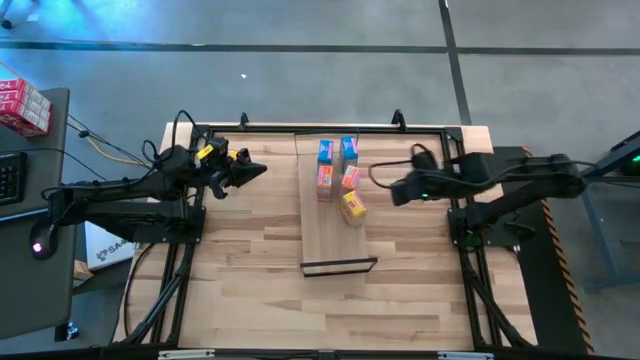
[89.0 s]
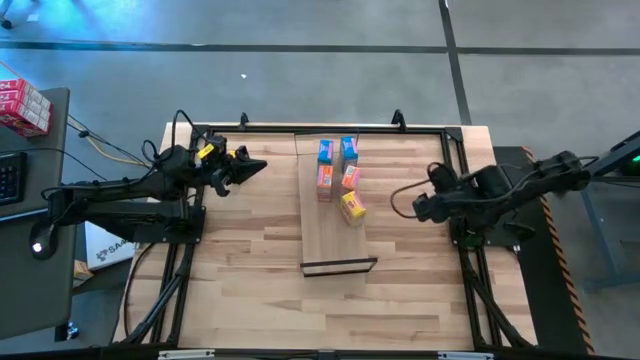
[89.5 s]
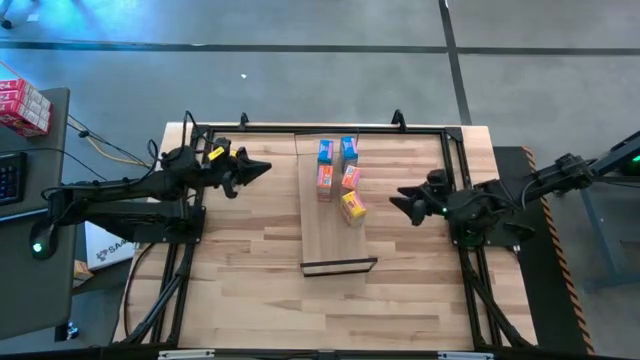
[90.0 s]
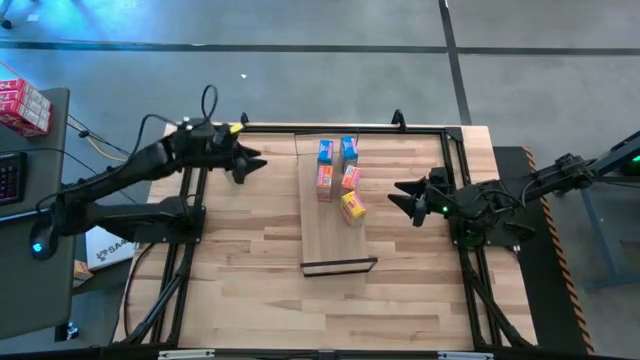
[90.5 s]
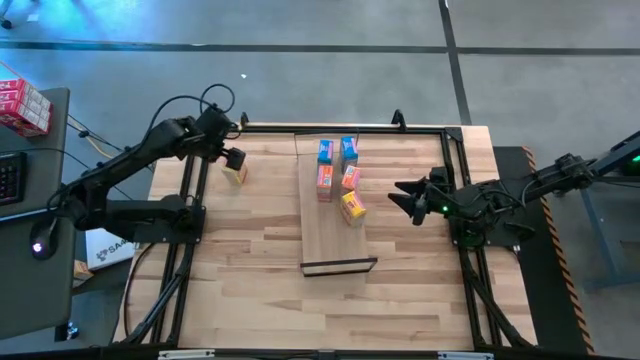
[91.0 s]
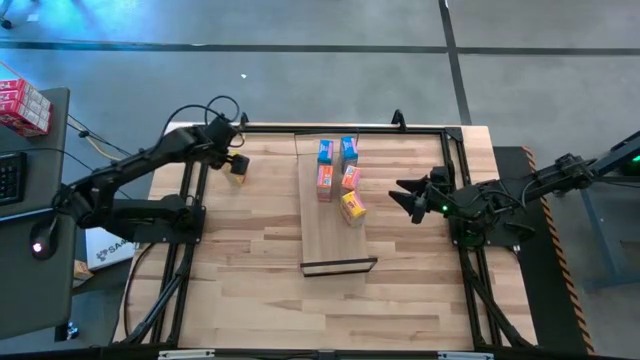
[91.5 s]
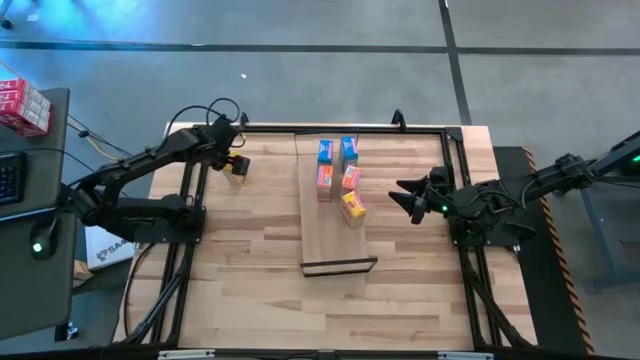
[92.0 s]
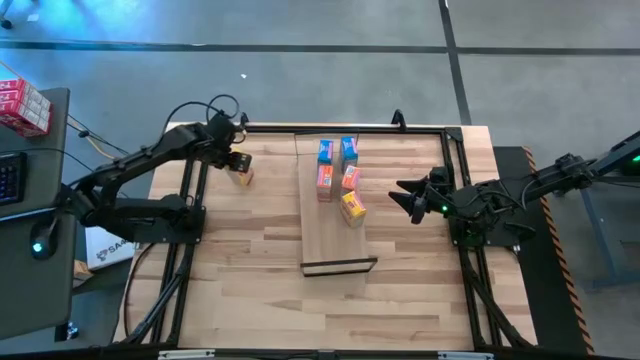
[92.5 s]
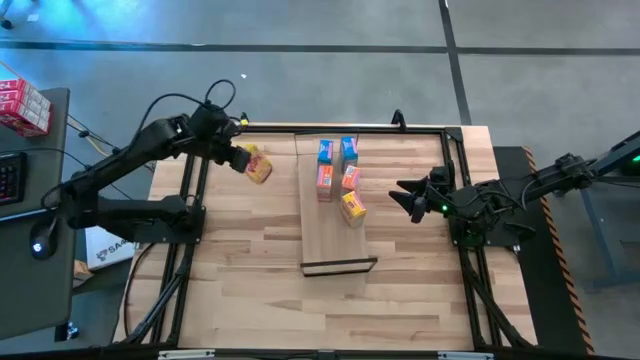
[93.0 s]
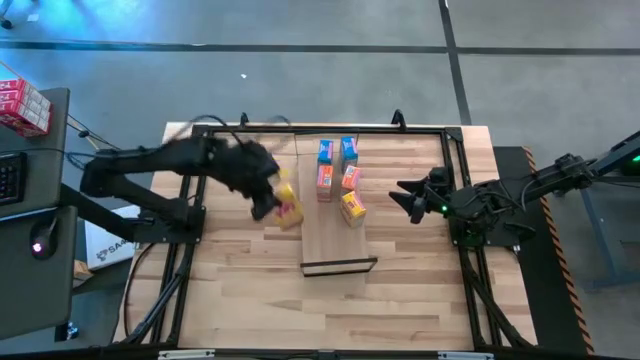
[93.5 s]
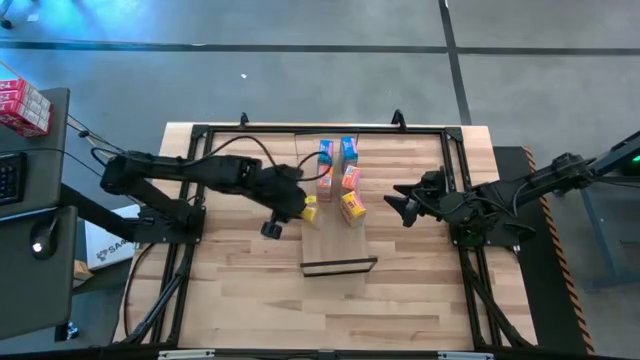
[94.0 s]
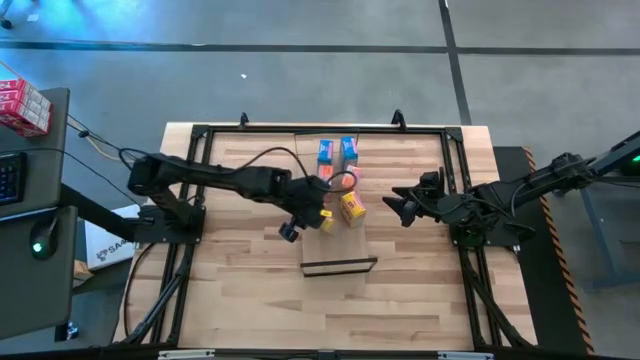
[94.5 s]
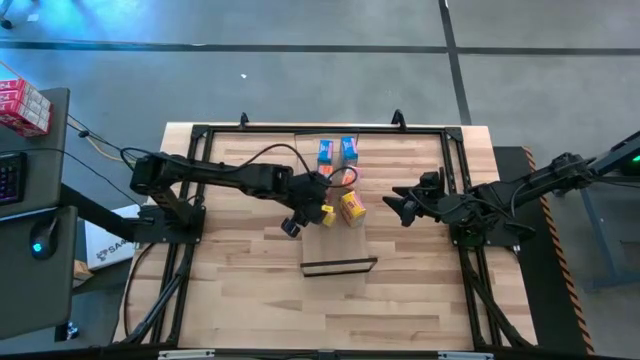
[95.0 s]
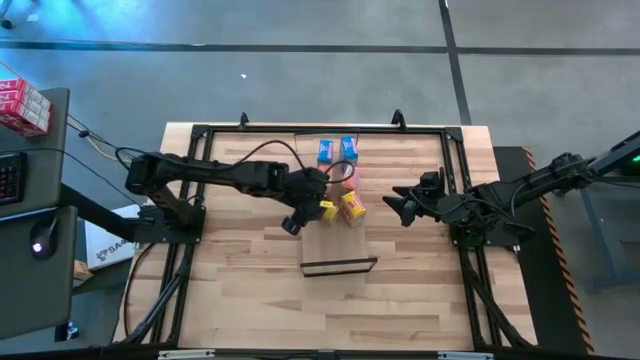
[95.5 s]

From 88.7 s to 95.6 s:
Task: Stack cereal on shelf
Put the yellow cereal box on the shelf aligned with the other yellow cereal box

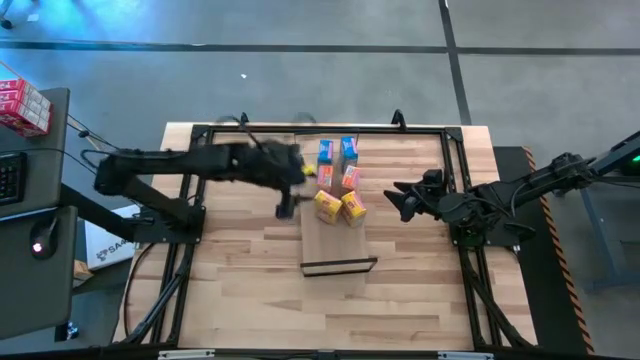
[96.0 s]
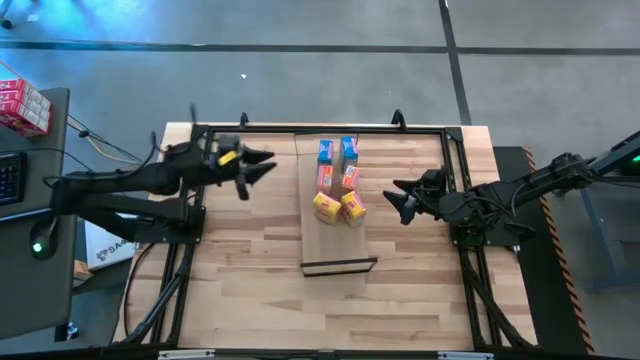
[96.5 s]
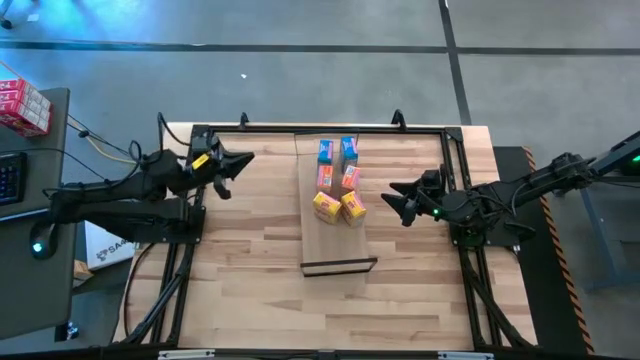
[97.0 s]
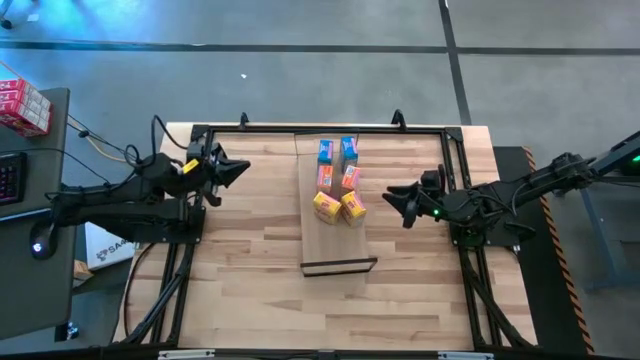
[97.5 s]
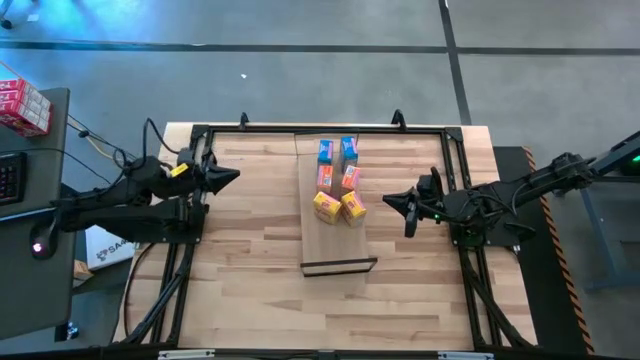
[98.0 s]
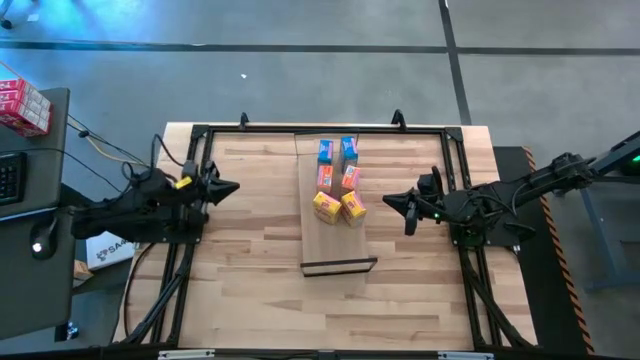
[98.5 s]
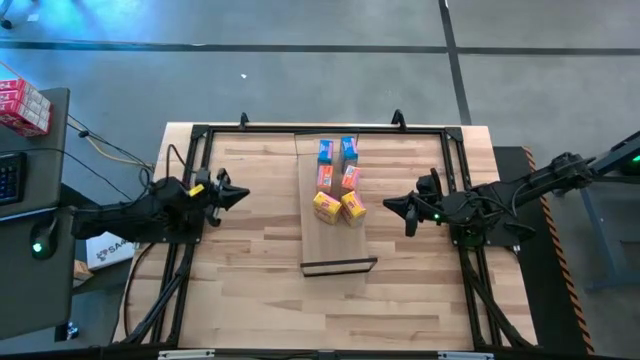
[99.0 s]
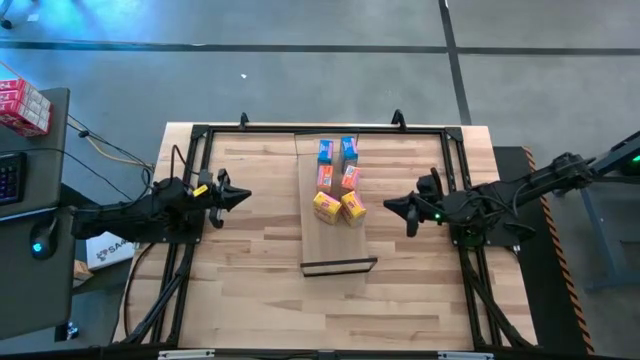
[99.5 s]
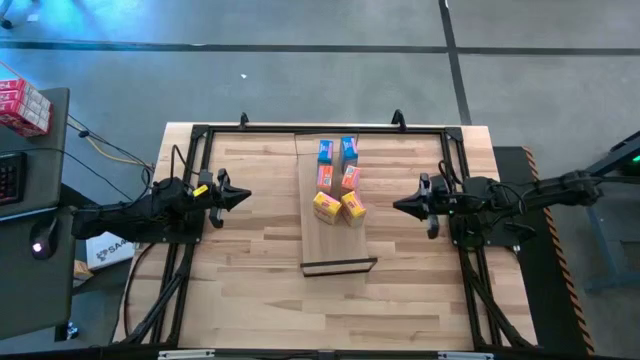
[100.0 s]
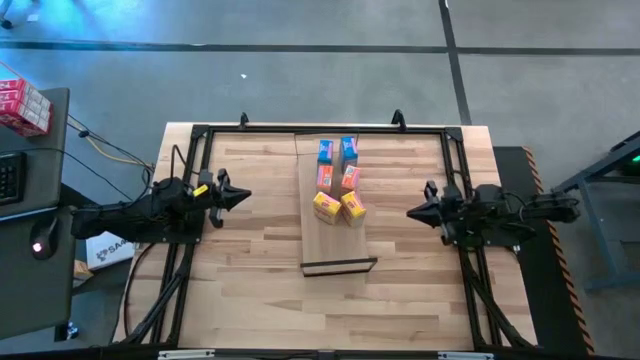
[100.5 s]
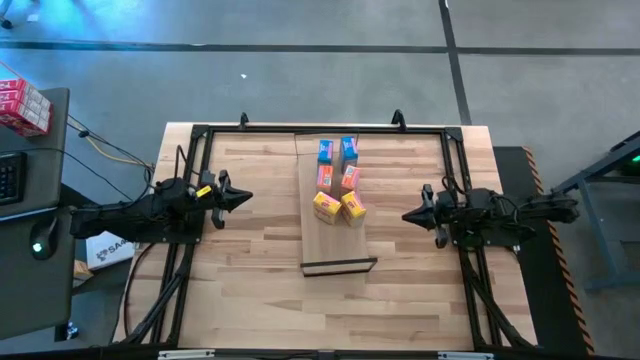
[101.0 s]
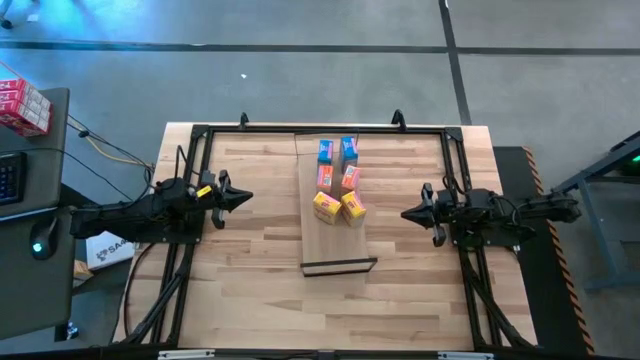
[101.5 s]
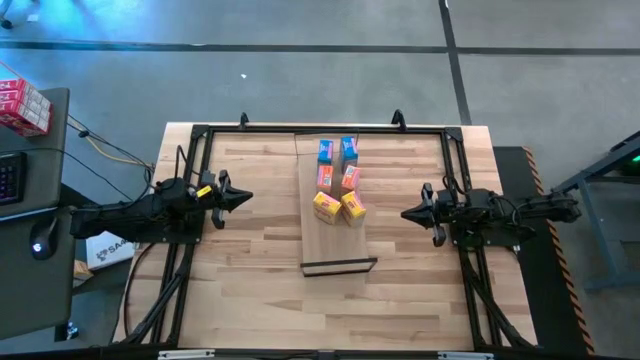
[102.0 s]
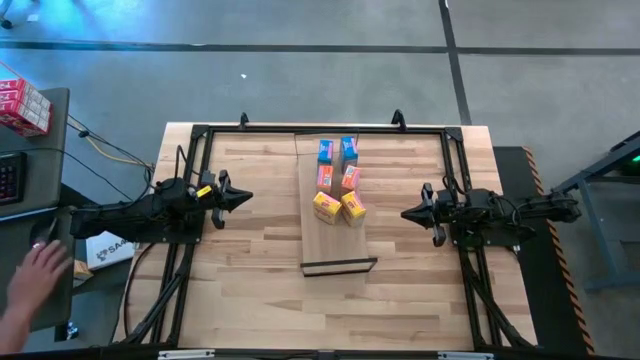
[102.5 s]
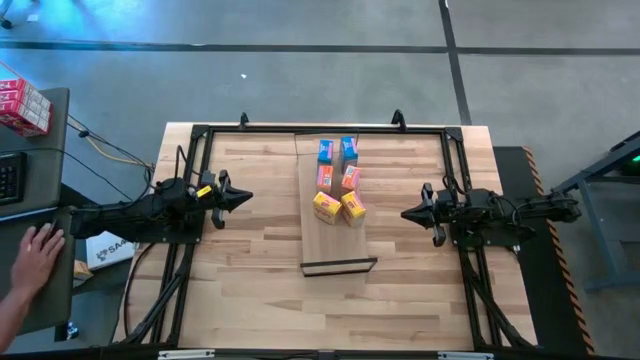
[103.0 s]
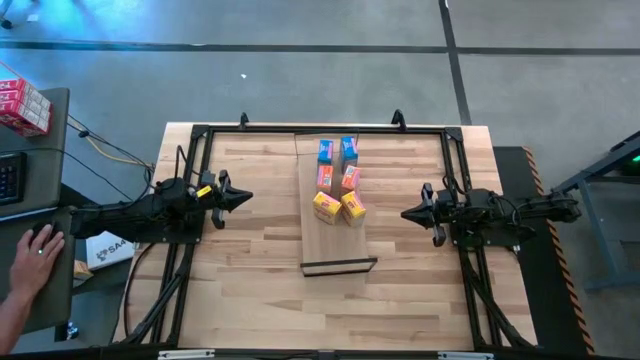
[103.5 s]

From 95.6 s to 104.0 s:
Return to Home Position

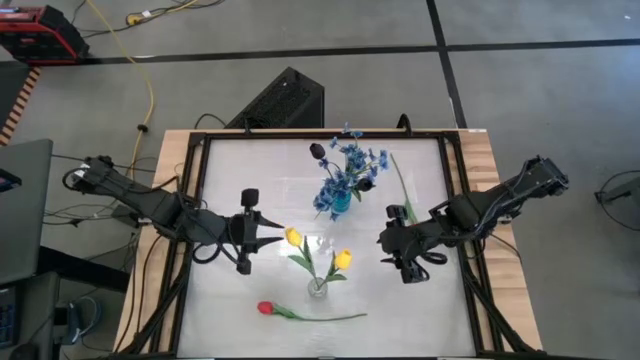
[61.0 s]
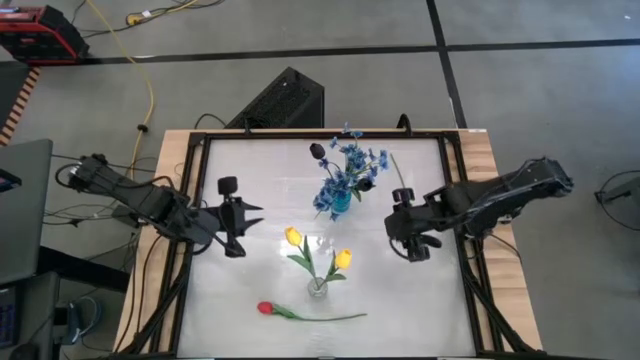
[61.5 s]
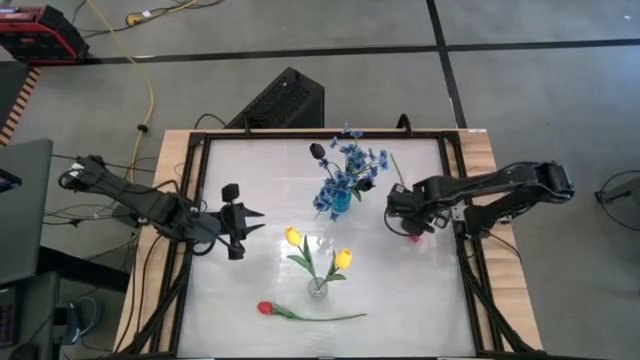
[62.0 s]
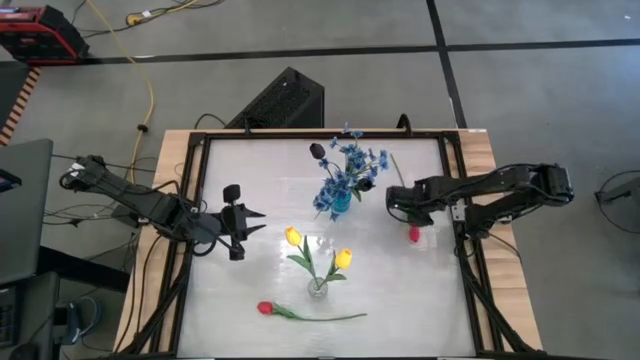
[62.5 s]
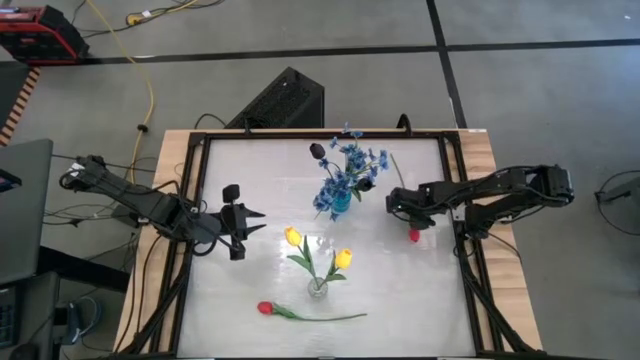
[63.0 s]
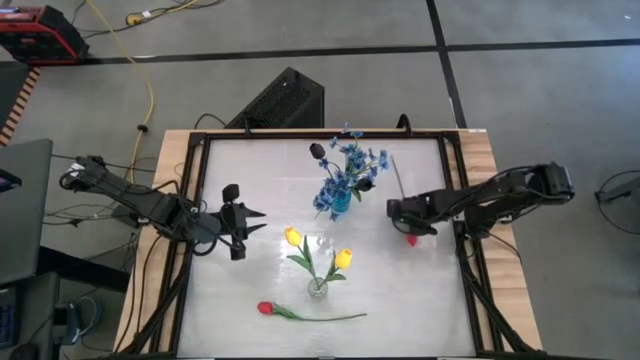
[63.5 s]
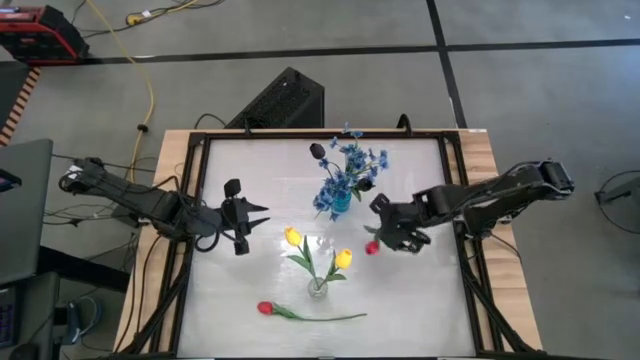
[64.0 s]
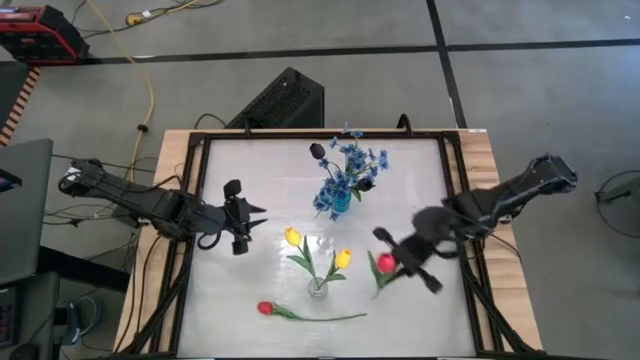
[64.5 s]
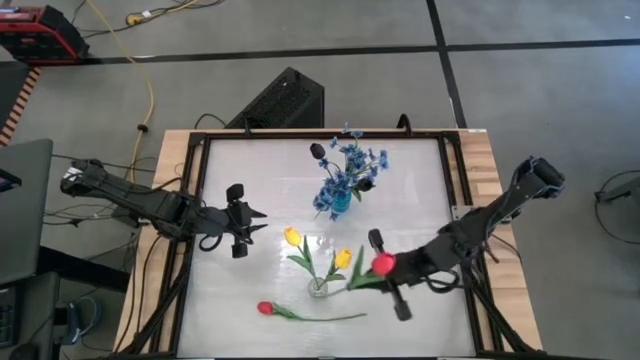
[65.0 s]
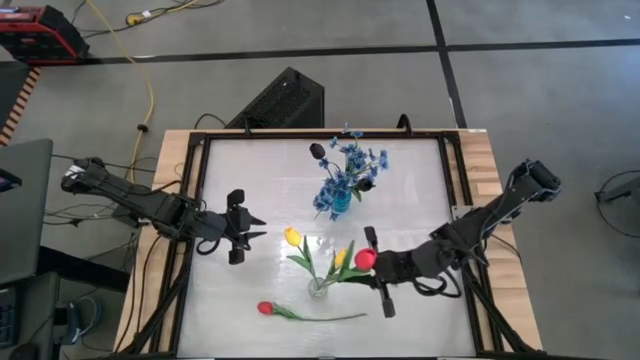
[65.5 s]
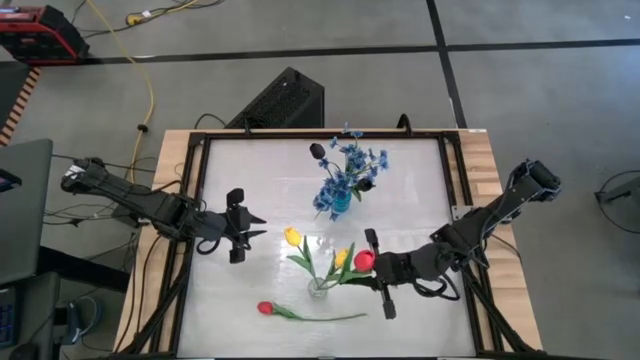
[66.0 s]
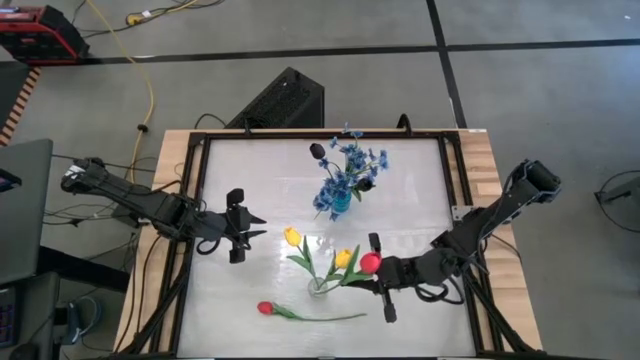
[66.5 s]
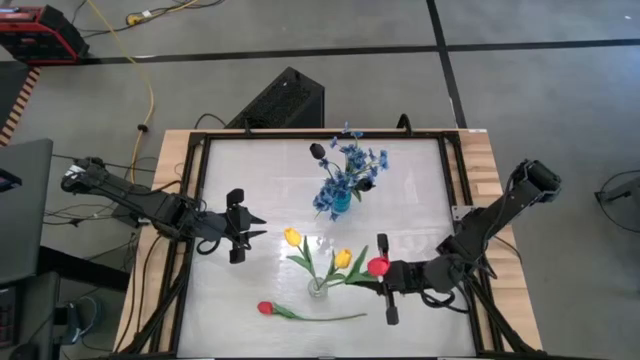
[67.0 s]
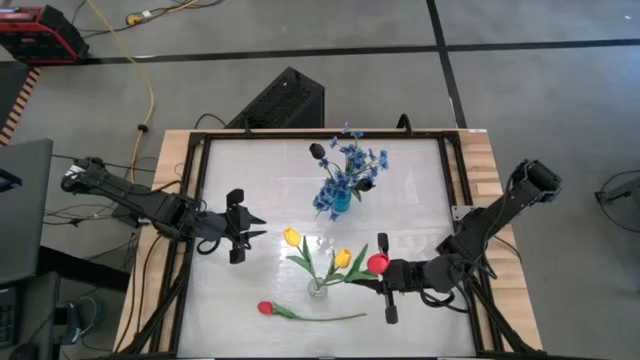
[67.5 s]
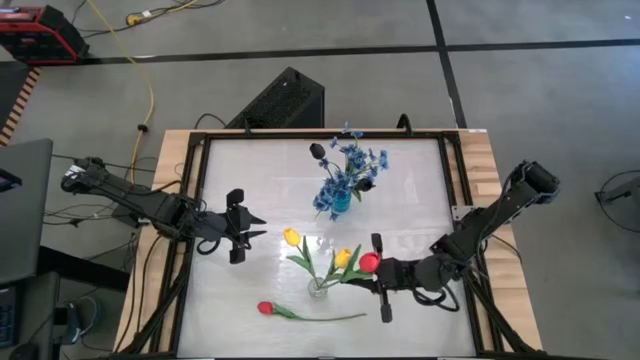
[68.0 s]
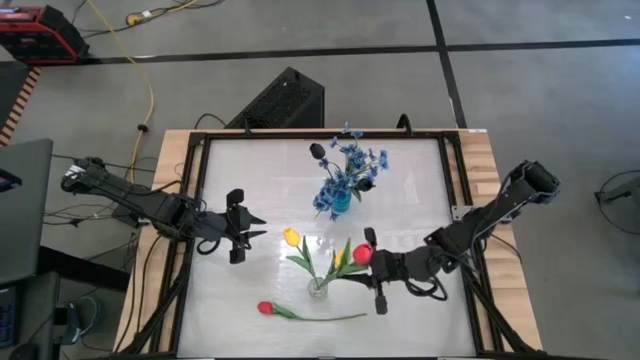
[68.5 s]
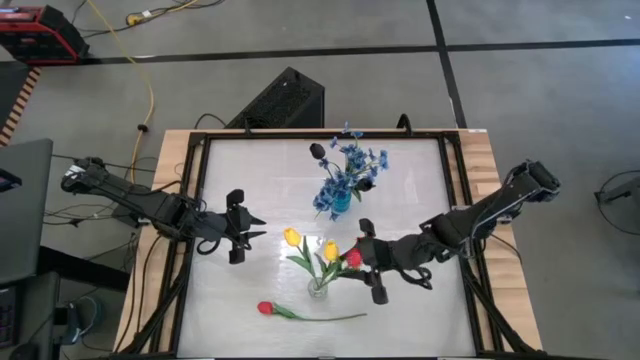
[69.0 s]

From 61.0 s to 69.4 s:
Task: Sort flowers into vase by color
Put the top right red flower into the transparent vase
